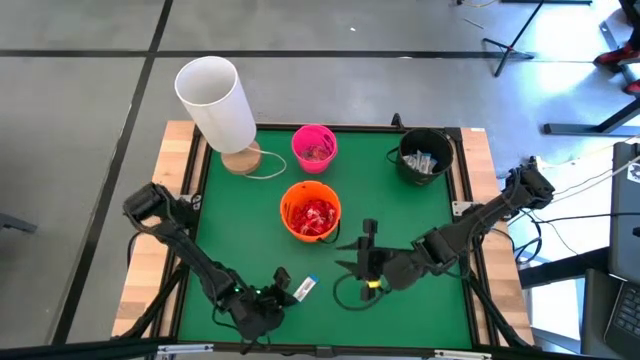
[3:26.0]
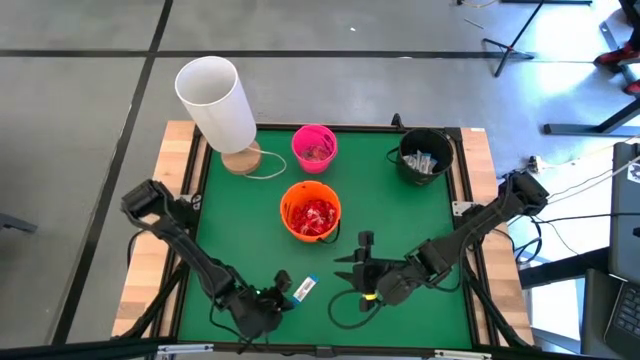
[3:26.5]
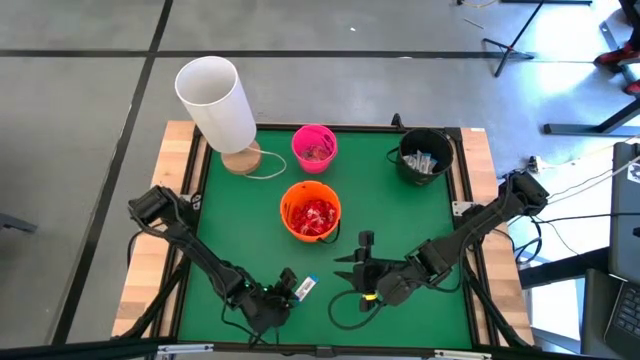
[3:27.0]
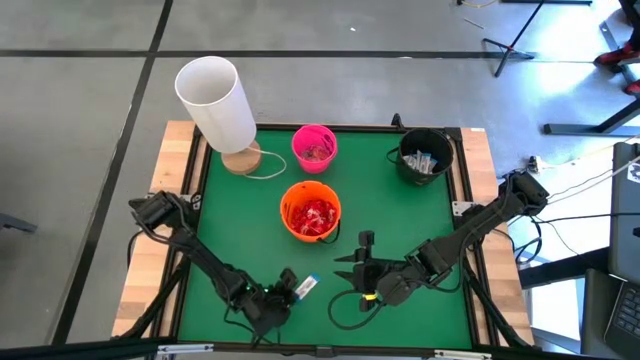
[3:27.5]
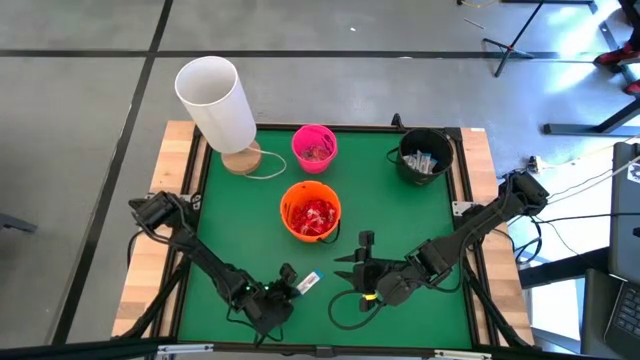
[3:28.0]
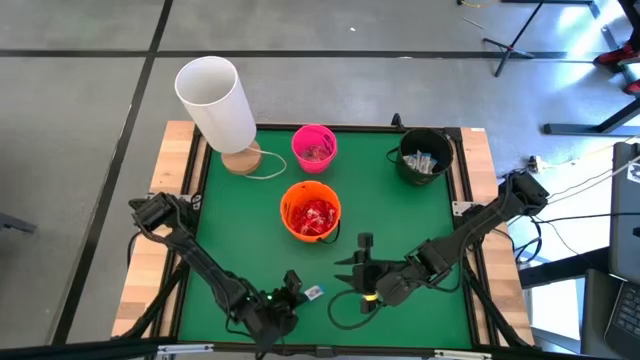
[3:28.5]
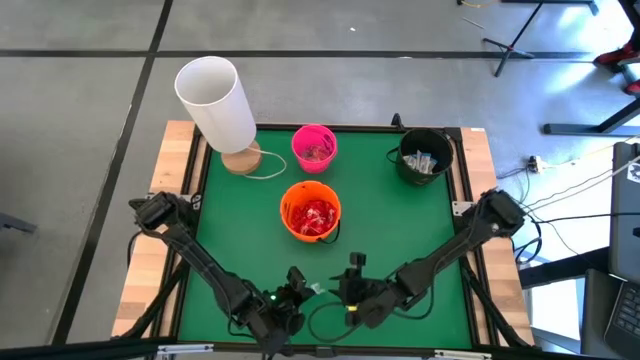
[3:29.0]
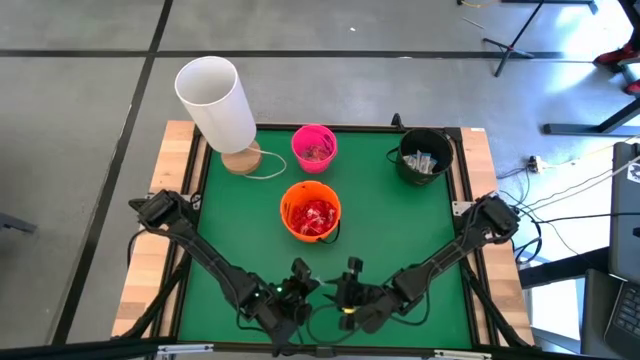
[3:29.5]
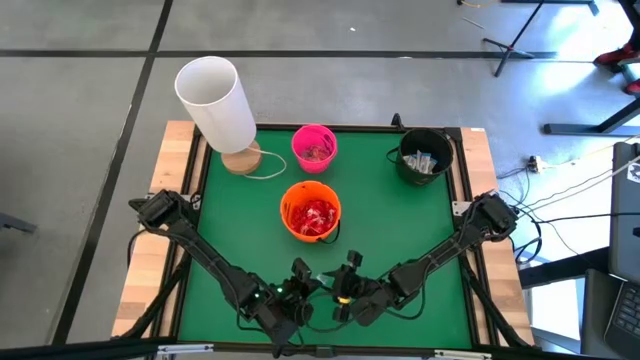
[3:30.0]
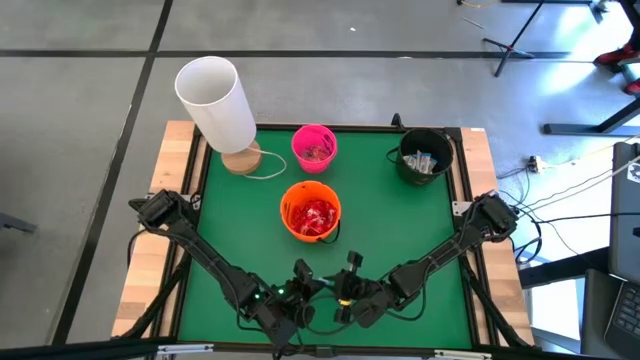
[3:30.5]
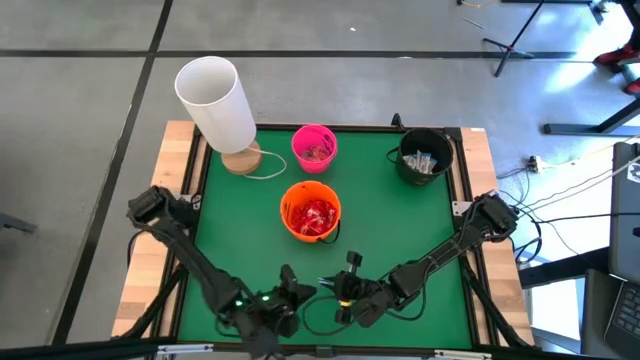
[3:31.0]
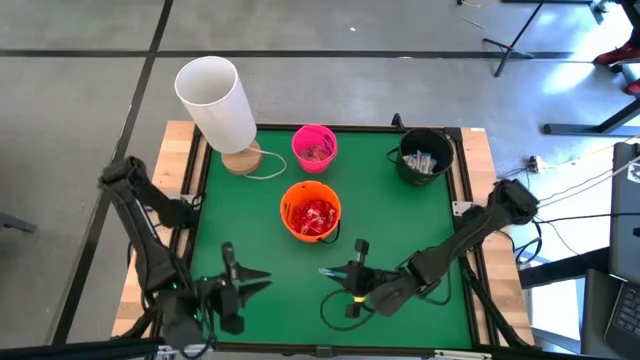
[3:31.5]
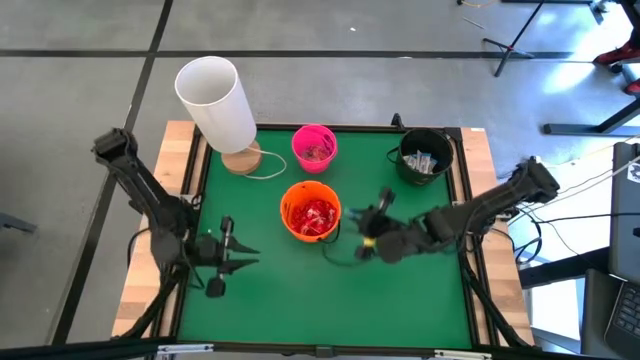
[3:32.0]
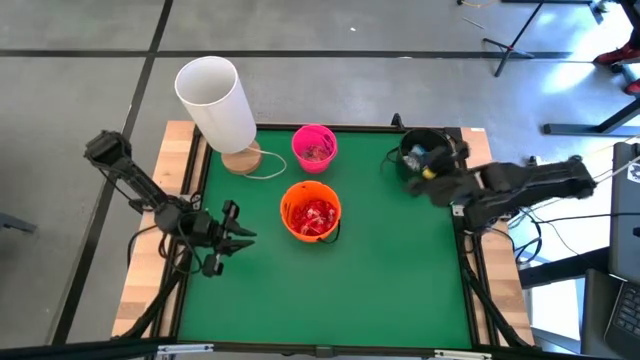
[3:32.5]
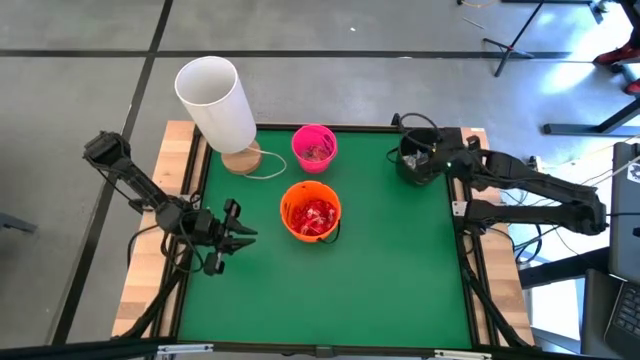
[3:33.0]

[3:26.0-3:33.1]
Task: Sort candy
Put the white candy into the black bucket

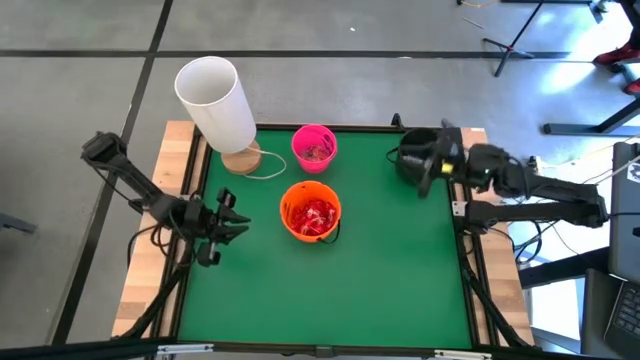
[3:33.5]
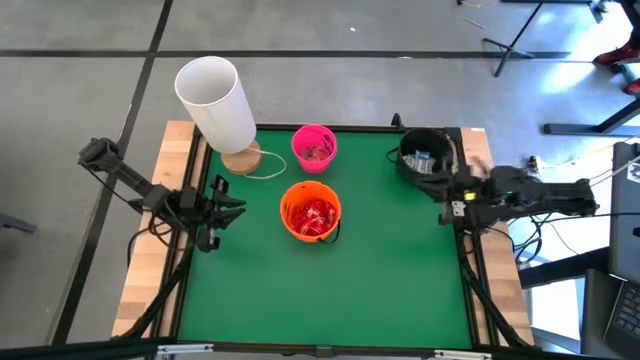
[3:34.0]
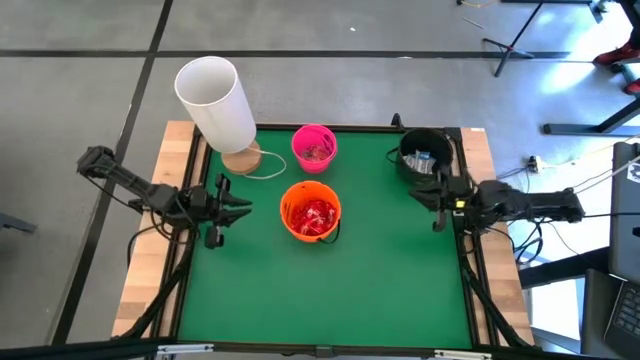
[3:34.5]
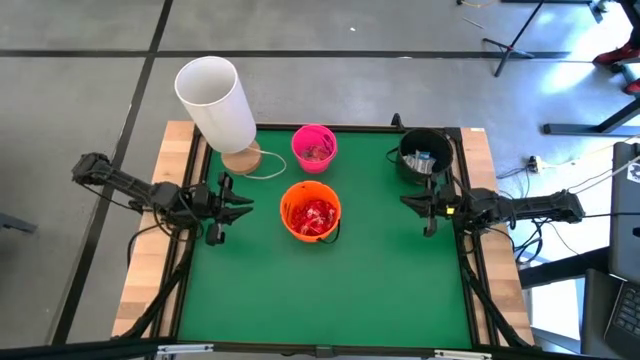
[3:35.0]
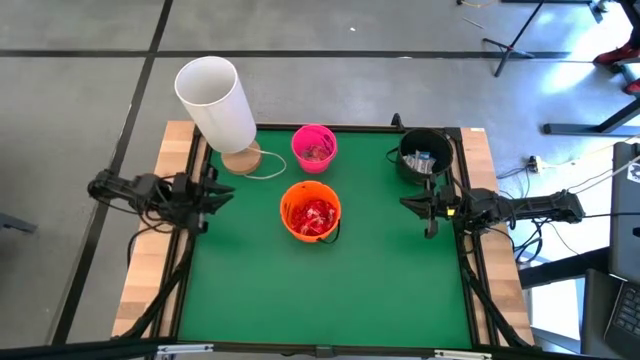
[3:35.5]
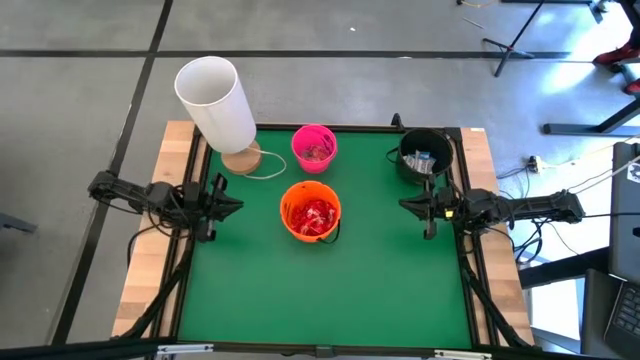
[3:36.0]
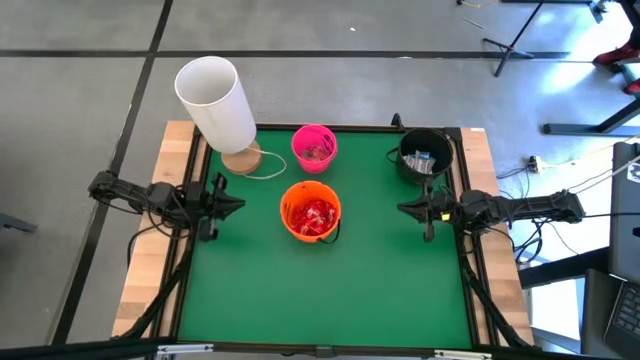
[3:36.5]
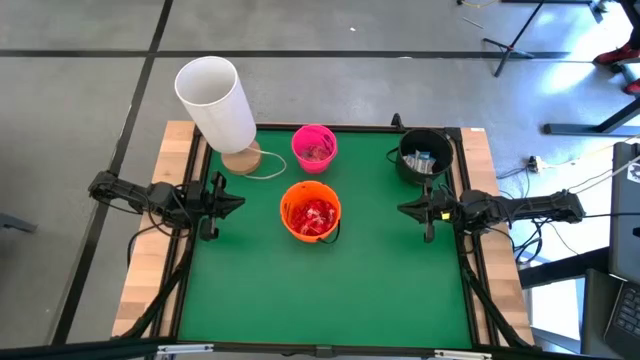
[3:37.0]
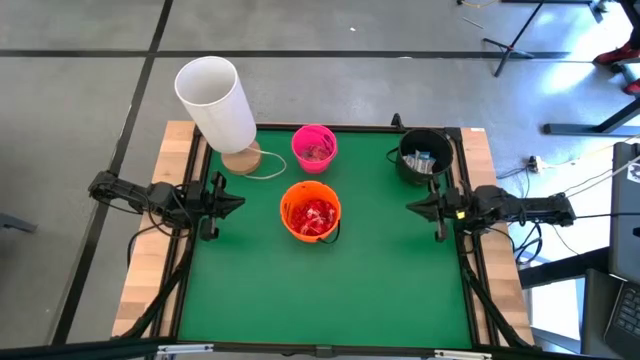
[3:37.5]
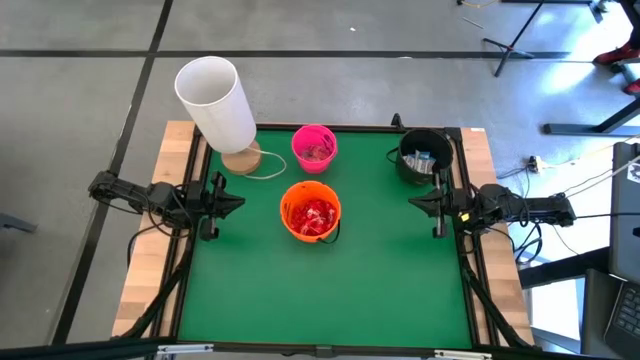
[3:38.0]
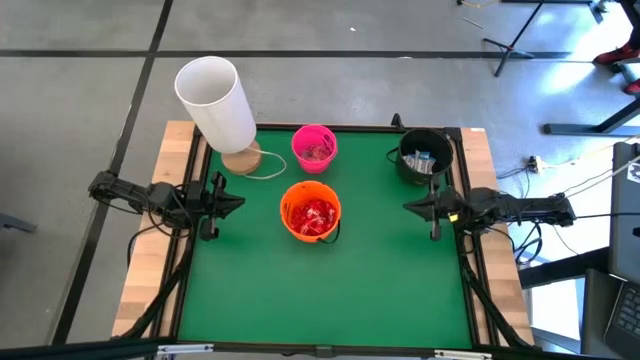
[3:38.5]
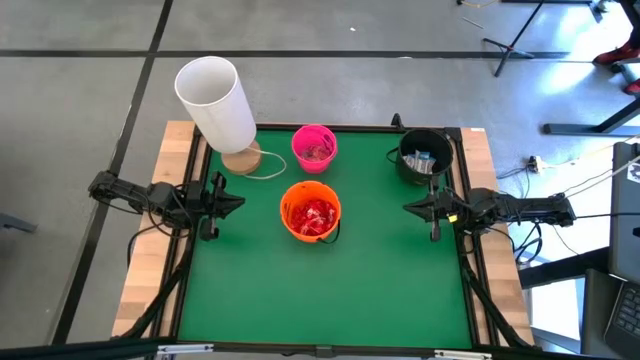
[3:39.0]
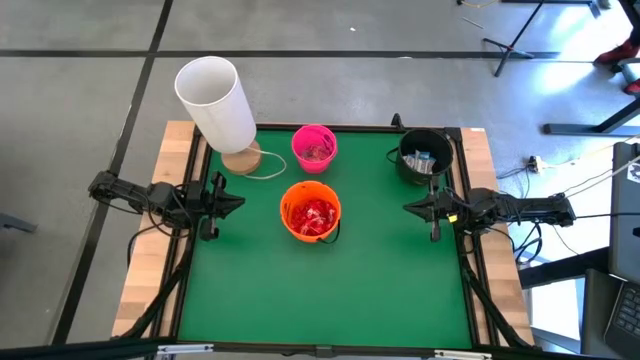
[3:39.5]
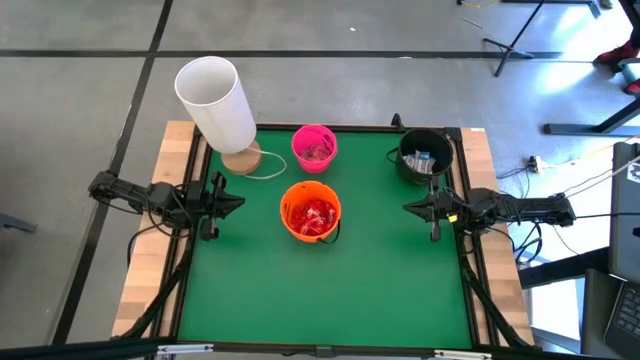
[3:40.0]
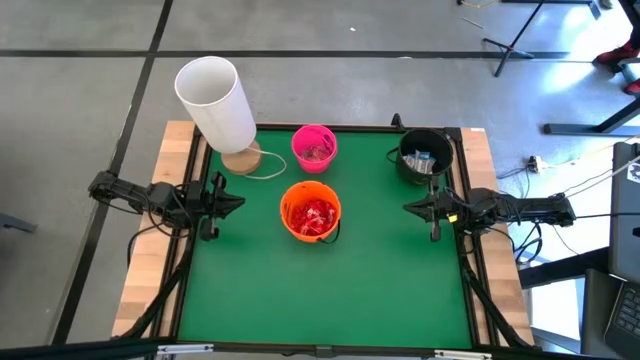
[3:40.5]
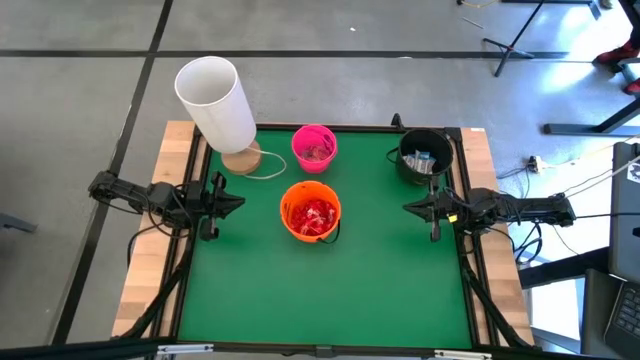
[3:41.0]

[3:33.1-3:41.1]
Return to Home Position

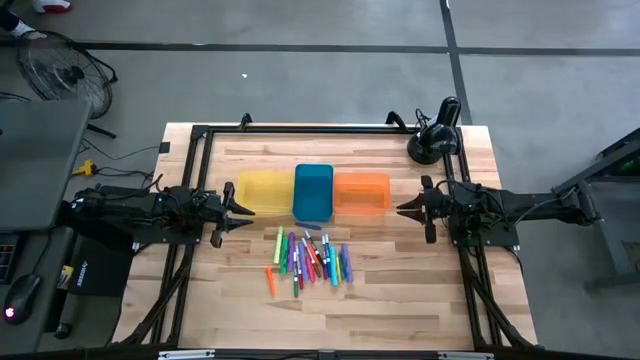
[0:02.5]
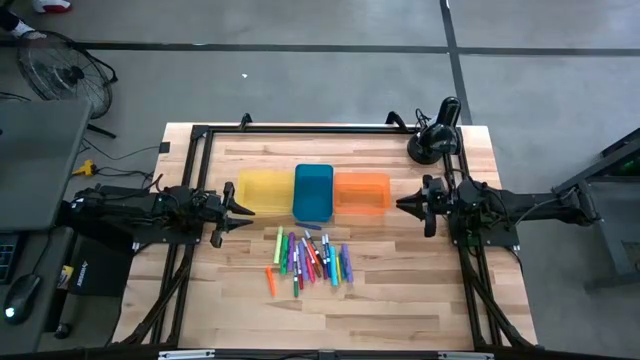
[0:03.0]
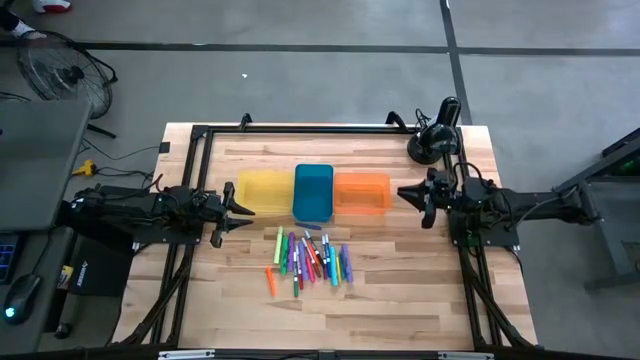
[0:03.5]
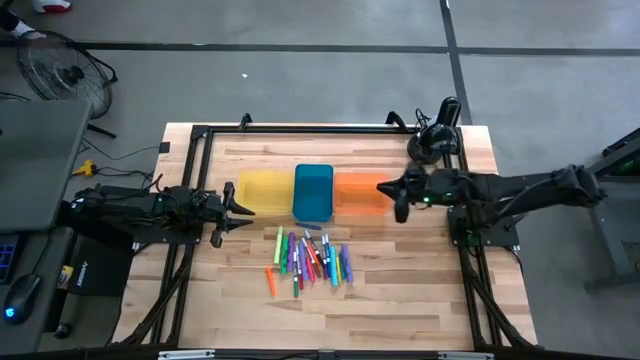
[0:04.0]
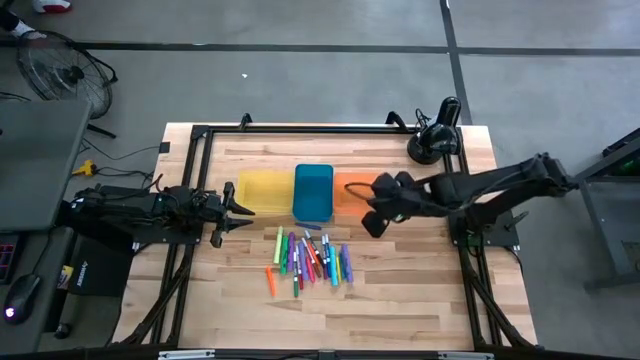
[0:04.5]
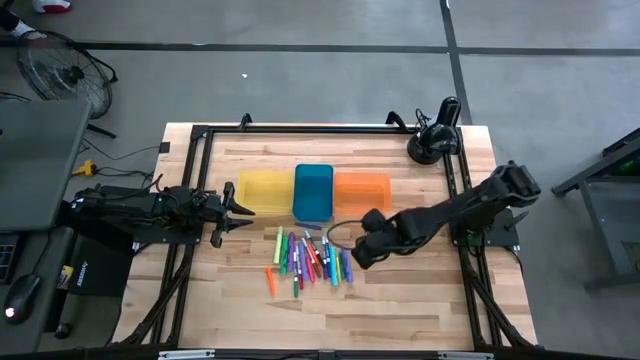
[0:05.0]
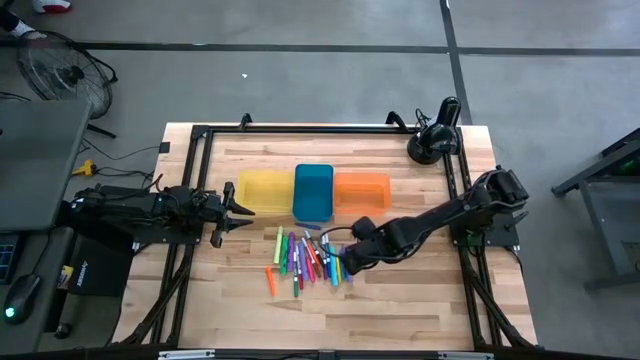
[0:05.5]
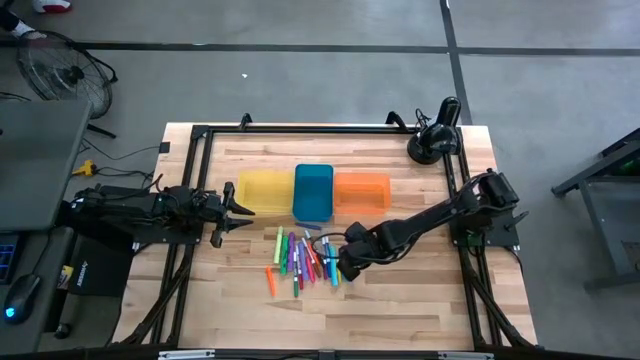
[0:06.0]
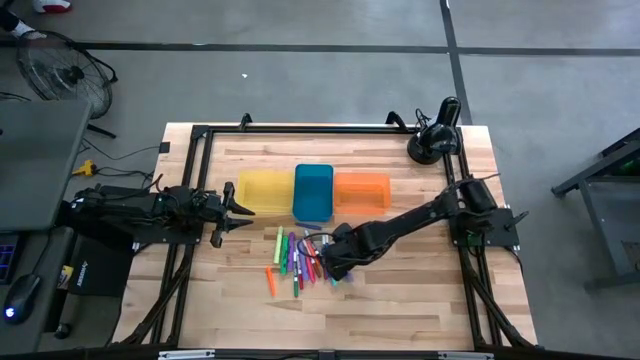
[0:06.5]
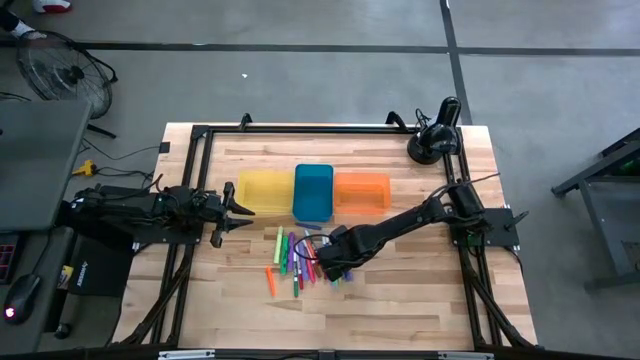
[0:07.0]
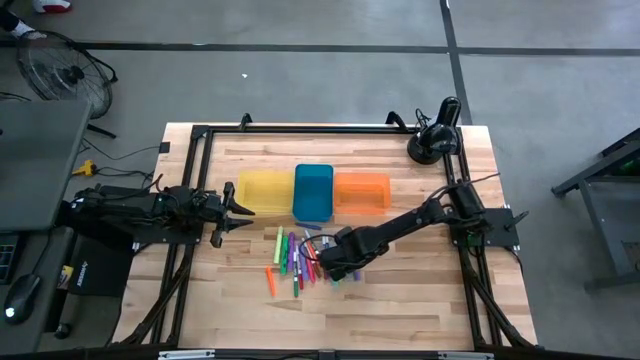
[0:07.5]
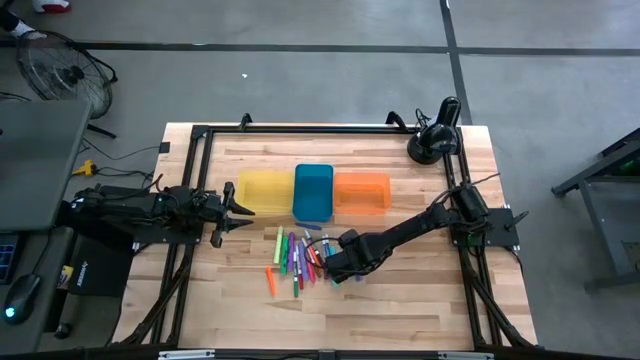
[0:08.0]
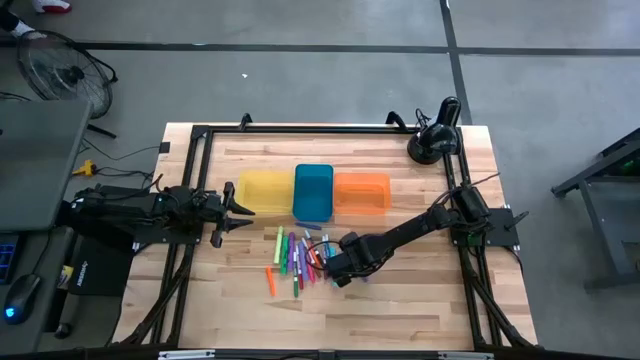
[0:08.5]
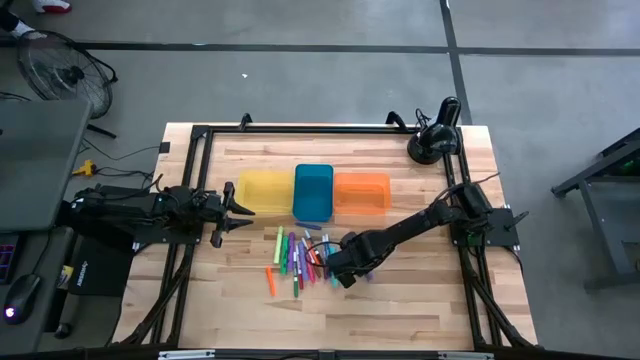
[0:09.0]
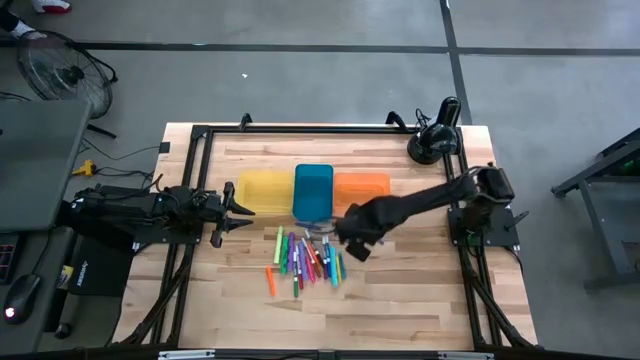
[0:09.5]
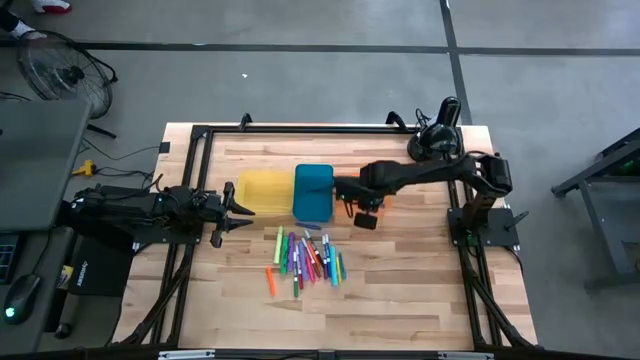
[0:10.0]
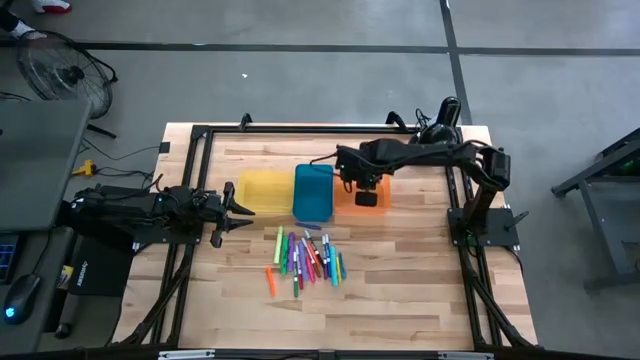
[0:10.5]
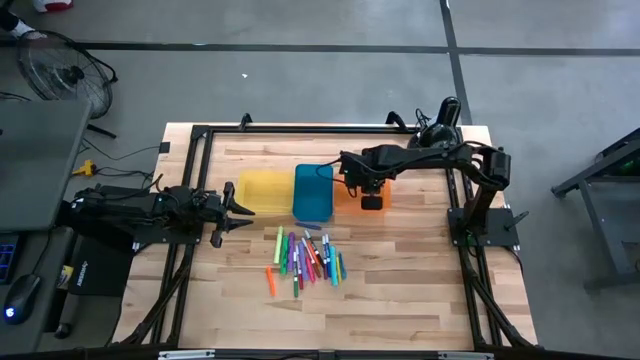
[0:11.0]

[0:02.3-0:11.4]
Task: Pick & Place Markers
Put the right light violet highlighter into the orange bin
